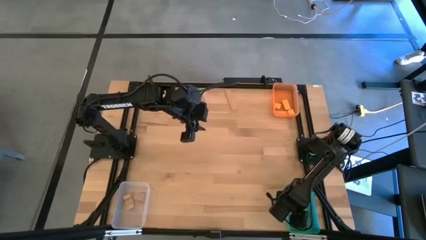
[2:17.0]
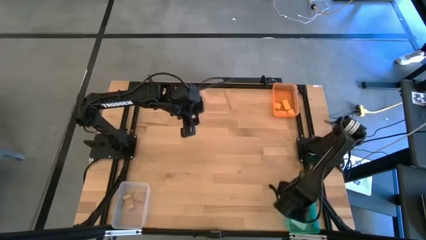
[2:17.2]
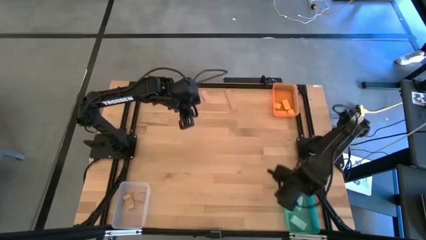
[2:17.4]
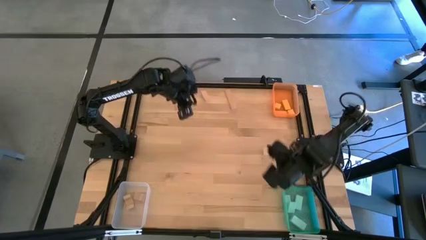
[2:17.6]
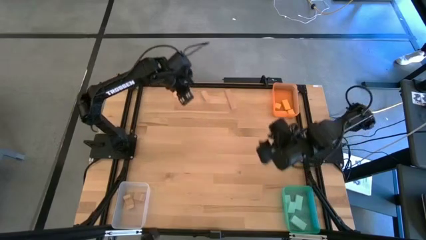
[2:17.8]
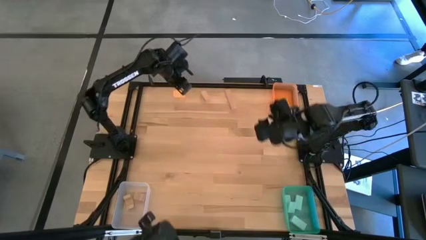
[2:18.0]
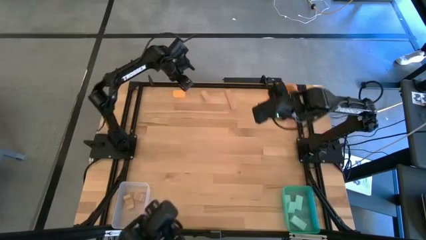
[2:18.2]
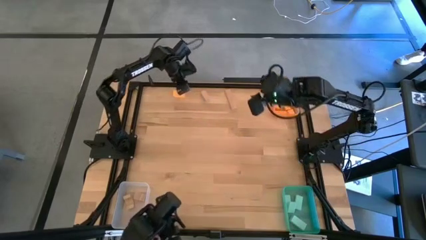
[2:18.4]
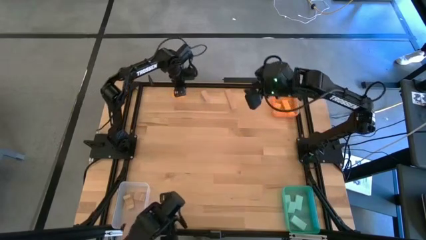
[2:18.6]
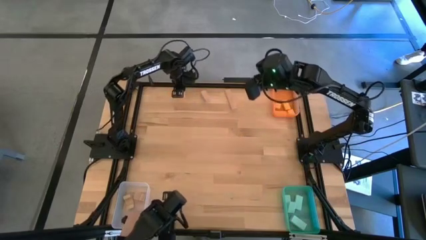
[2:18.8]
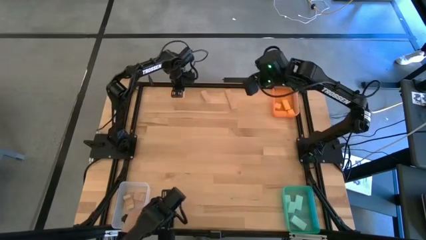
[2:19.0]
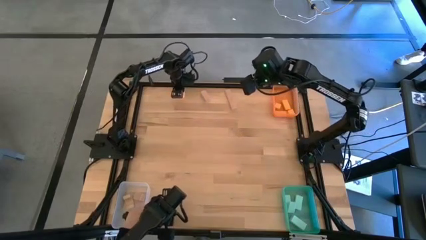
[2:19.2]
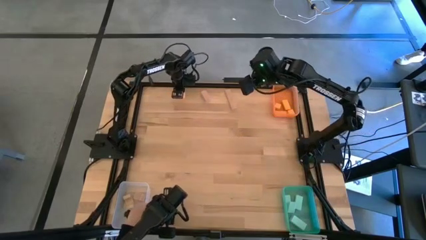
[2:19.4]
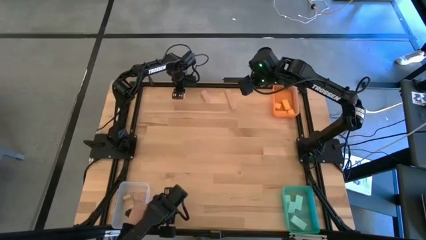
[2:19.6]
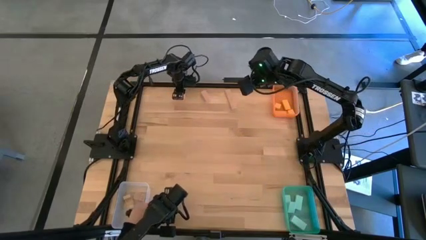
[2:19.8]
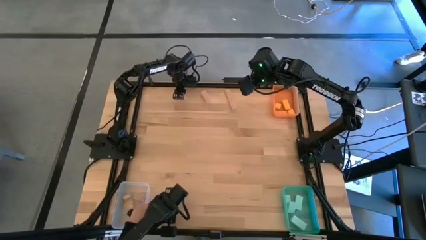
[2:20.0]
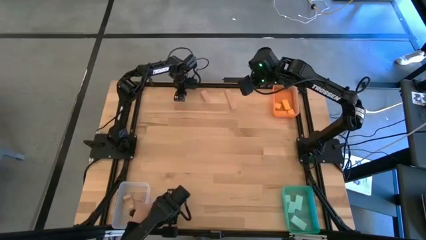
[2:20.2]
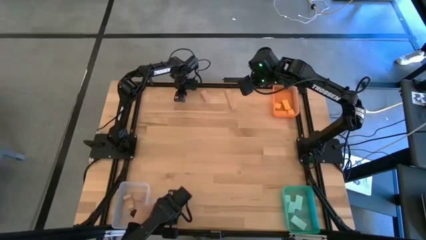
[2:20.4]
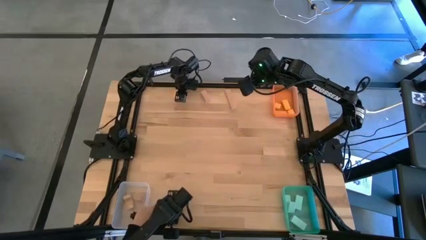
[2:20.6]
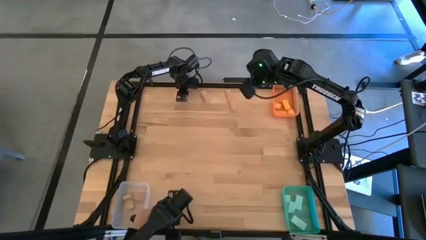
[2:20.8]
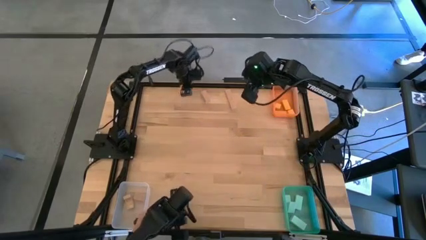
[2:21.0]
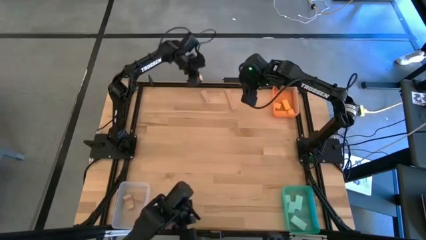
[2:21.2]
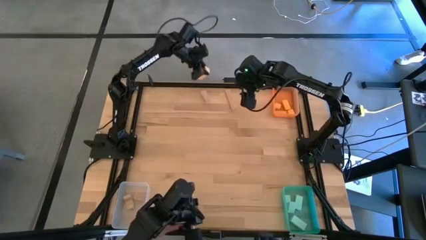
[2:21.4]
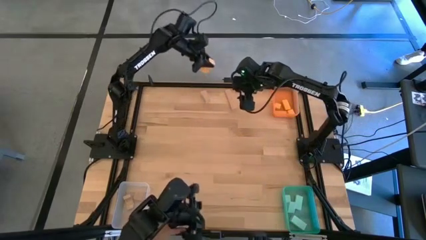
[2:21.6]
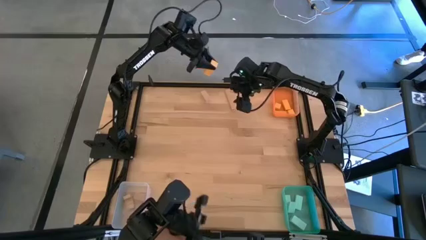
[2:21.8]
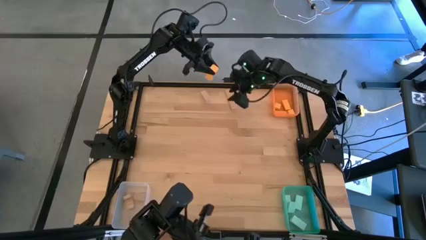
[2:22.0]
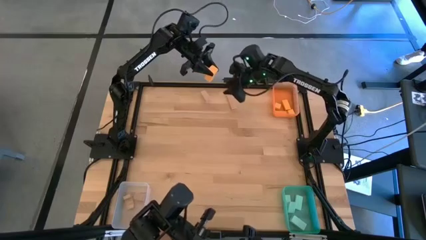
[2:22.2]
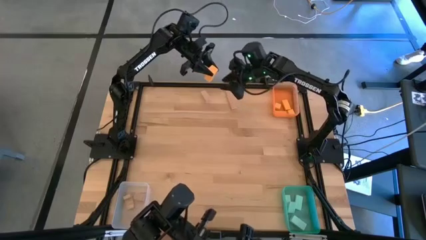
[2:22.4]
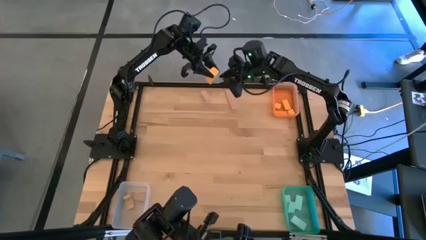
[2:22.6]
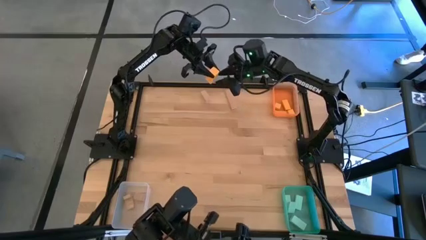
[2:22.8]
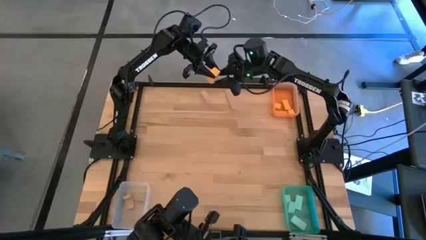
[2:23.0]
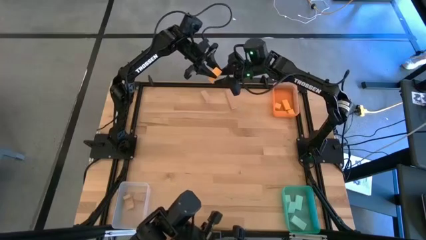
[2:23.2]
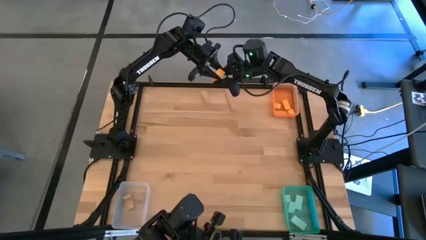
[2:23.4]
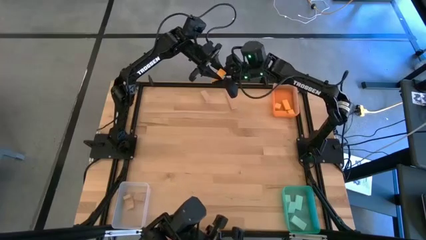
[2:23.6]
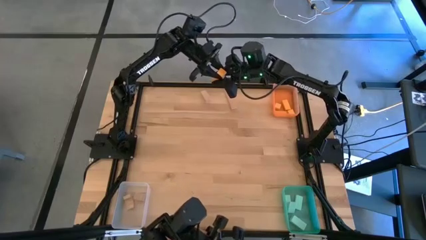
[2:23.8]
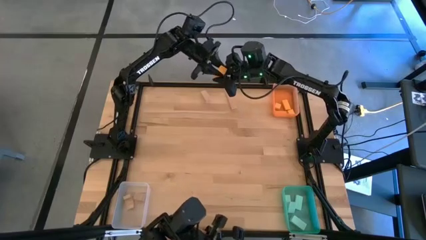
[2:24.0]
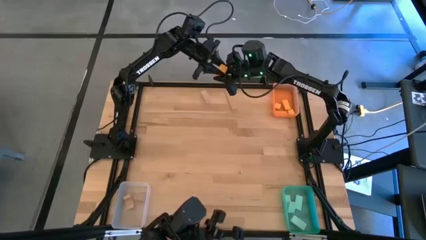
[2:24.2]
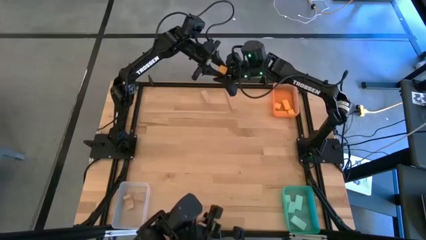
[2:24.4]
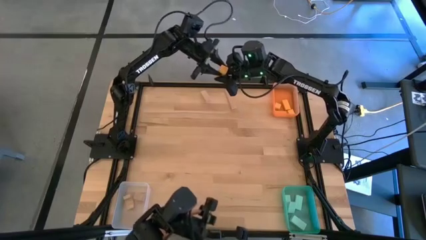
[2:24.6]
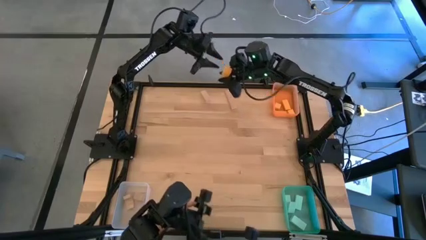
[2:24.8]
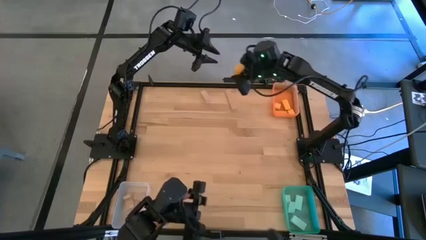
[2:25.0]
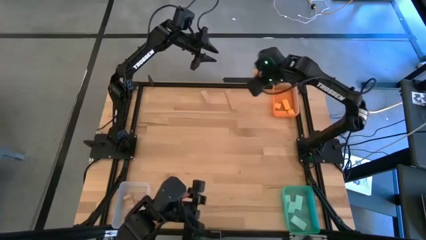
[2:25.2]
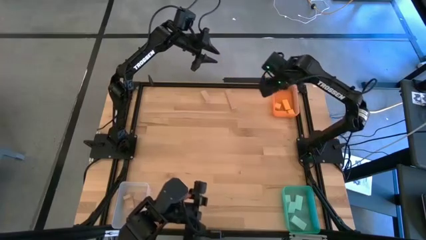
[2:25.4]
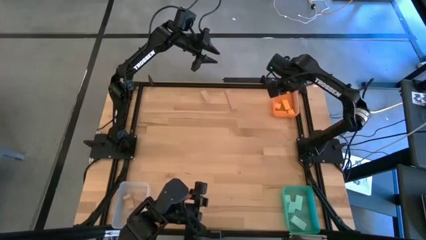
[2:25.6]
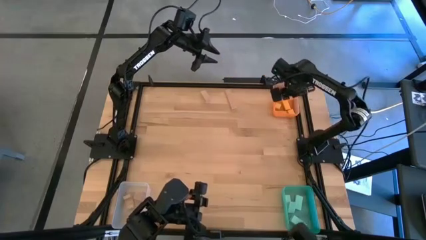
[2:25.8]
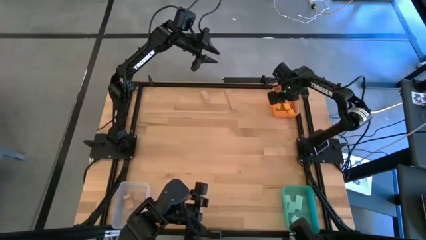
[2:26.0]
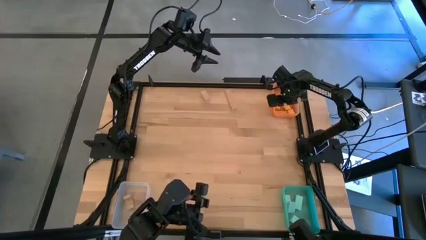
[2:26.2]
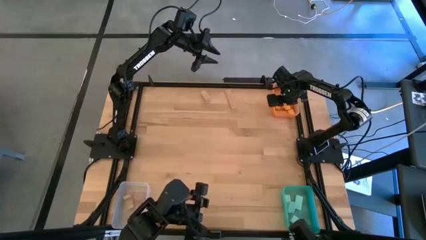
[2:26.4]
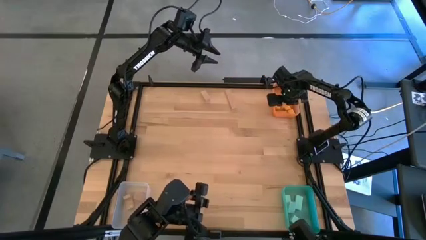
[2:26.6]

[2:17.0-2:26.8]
Task: Sort & place blocks by color
Put the orange block into the orange bin

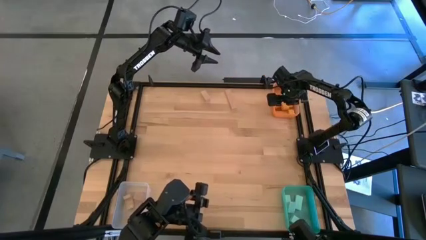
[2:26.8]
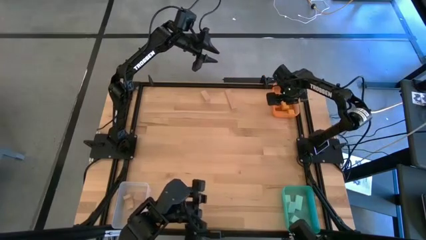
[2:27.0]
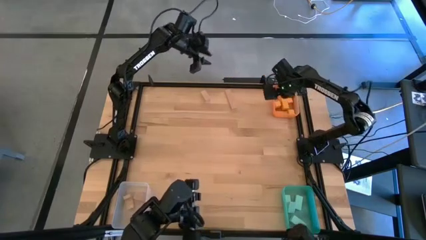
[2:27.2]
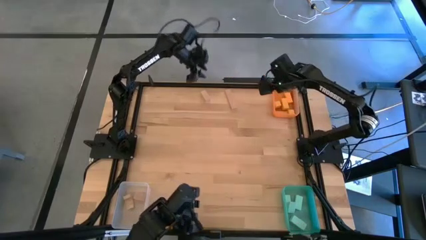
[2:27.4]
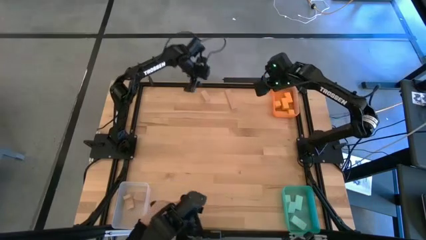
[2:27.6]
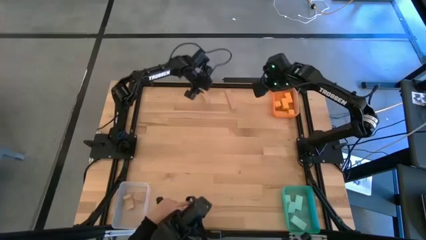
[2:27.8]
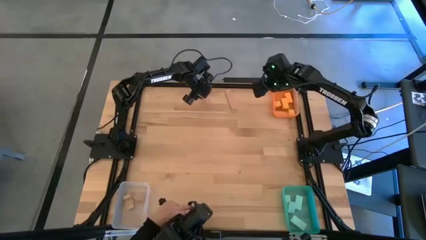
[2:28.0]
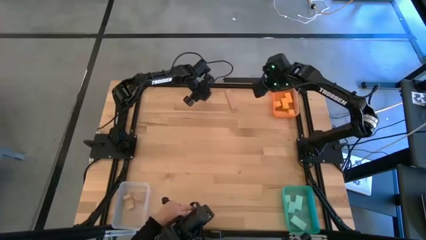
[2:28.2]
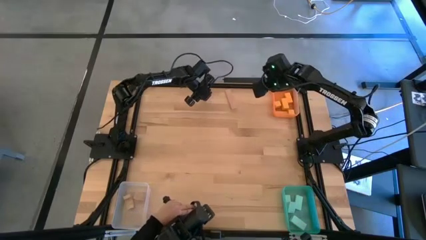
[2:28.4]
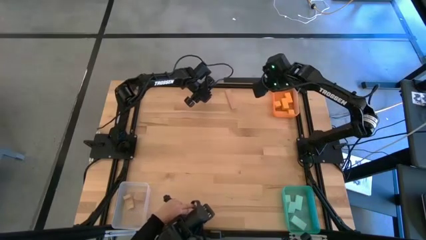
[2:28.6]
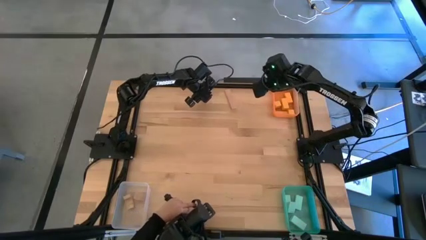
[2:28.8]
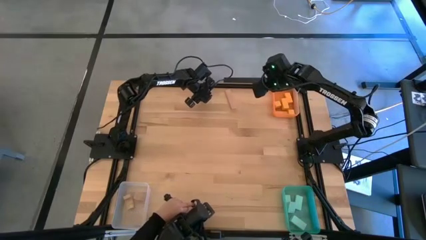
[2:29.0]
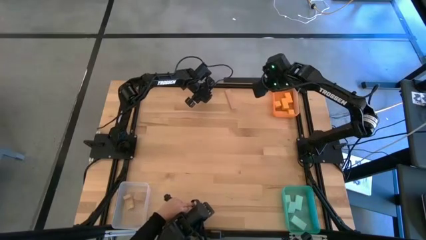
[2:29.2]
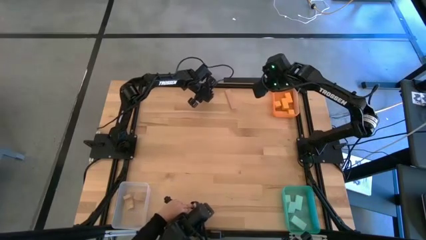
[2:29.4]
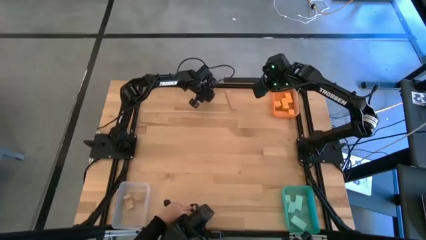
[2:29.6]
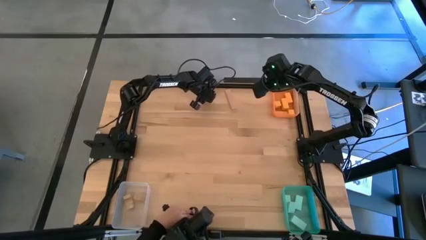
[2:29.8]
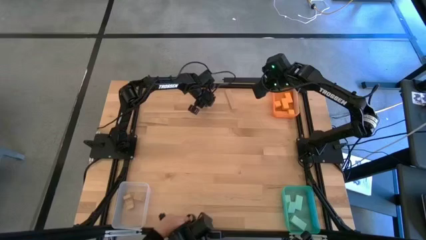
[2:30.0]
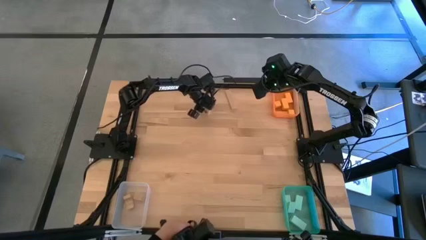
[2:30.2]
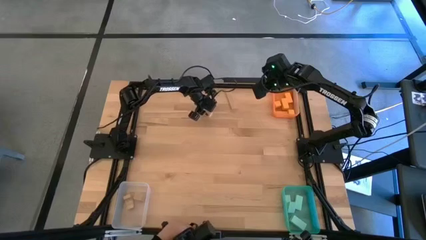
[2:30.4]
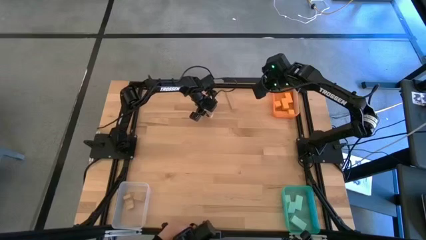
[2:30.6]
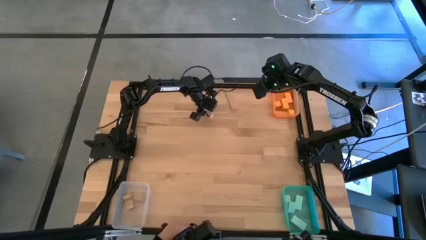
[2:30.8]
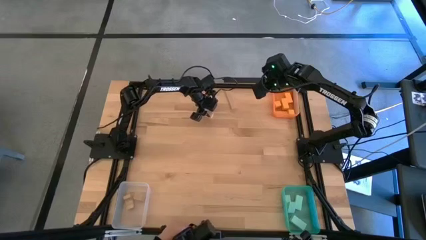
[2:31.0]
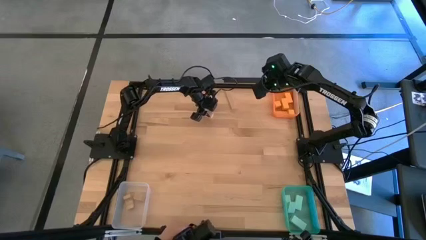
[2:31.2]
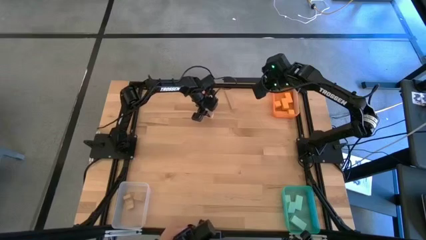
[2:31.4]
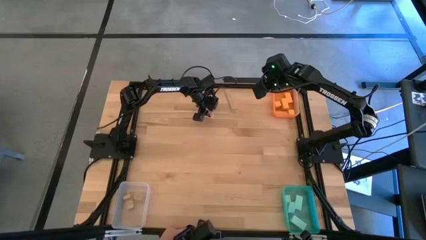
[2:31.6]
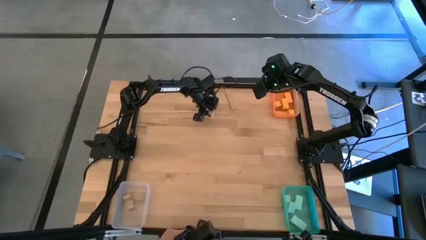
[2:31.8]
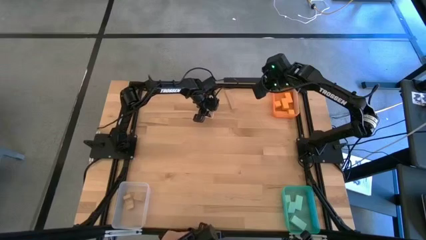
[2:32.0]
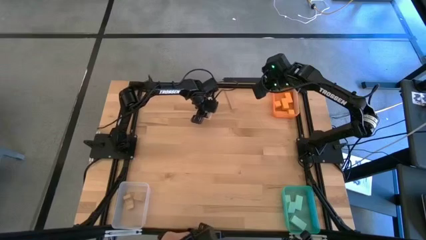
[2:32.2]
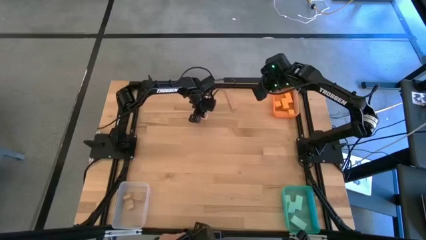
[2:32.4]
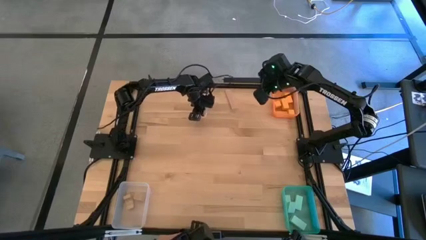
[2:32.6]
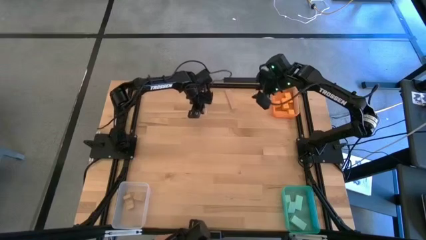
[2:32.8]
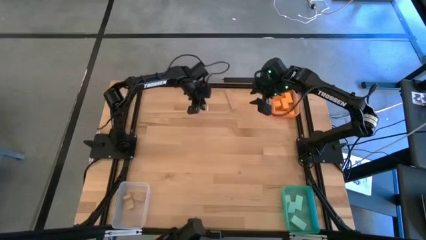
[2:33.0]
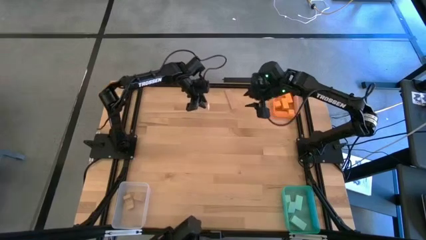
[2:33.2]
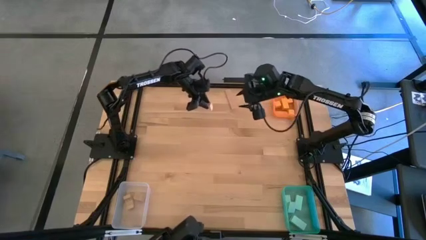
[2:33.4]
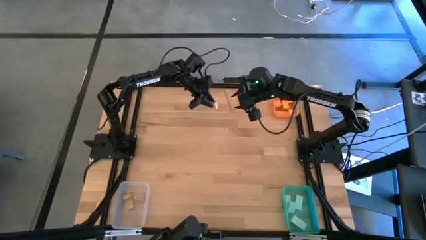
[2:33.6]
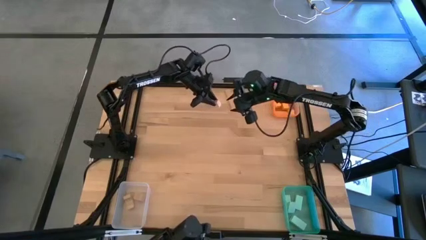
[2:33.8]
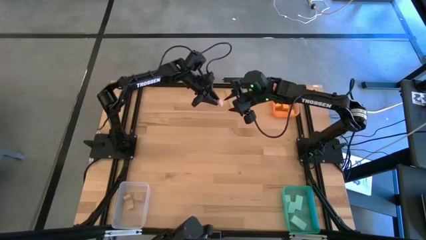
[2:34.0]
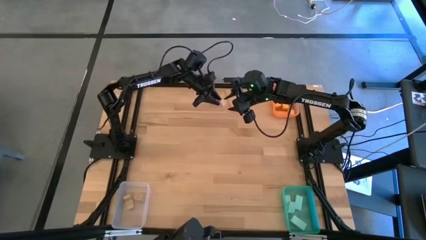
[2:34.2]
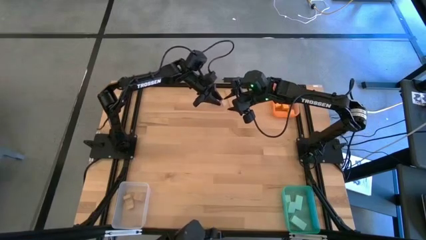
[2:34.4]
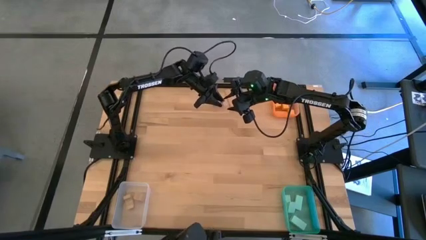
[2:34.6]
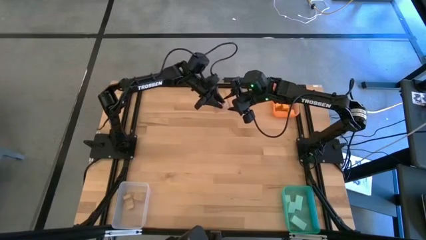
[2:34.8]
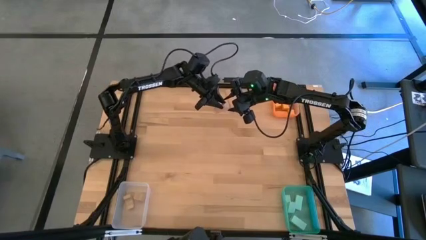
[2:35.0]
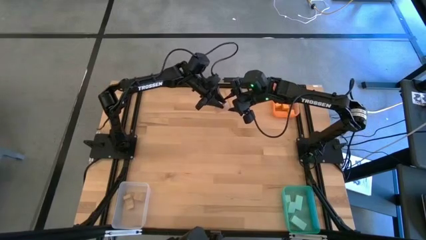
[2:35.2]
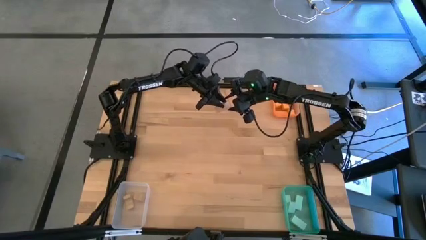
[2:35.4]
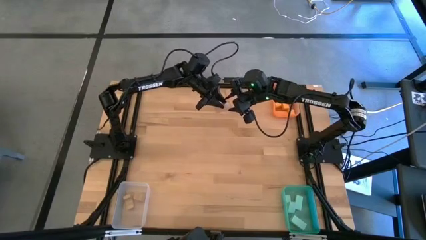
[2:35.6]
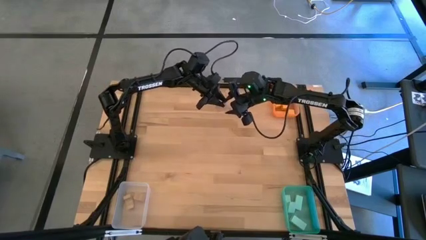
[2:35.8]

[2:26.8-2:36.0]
Put the brown block into the transparent bin
